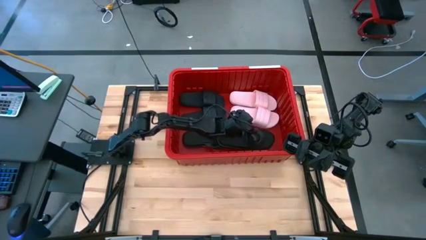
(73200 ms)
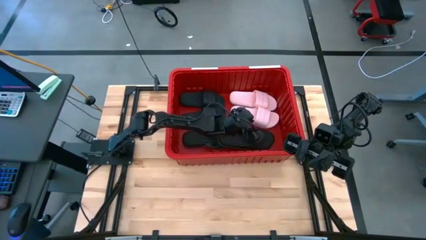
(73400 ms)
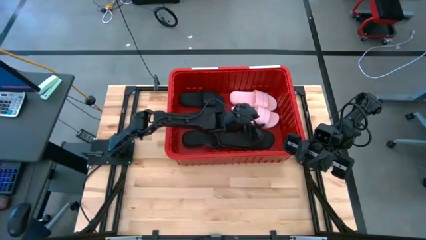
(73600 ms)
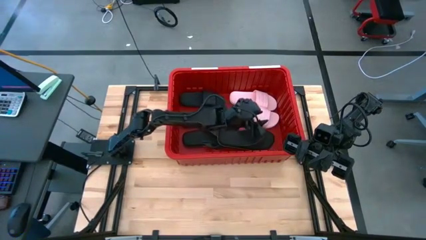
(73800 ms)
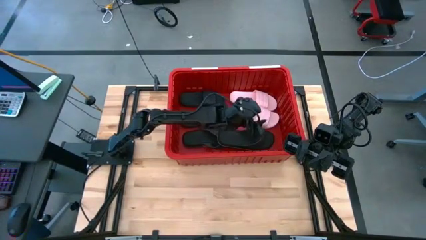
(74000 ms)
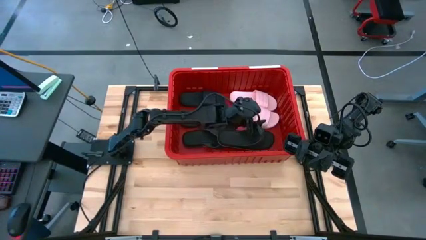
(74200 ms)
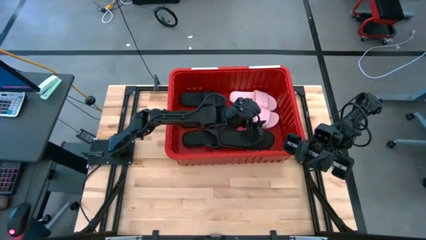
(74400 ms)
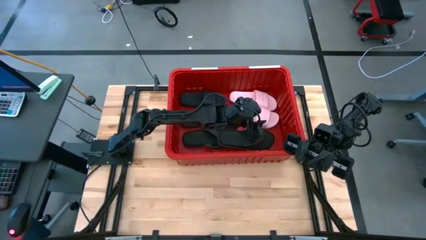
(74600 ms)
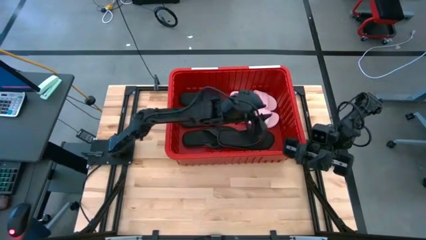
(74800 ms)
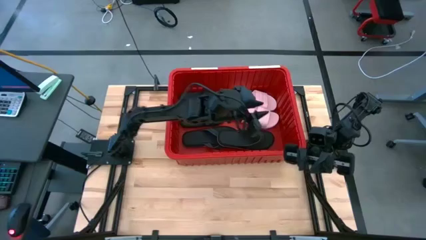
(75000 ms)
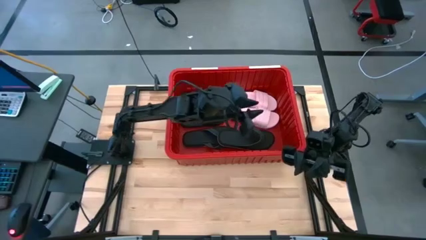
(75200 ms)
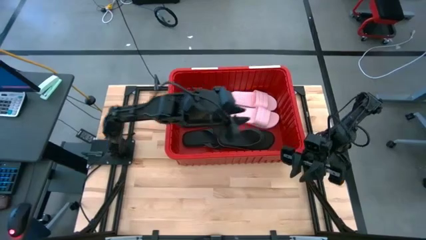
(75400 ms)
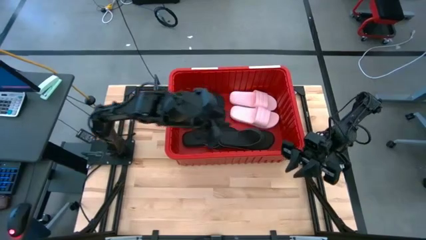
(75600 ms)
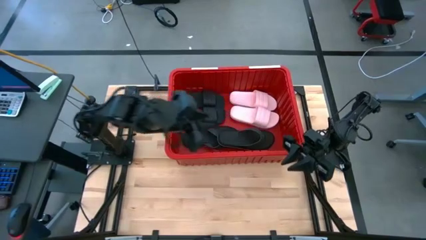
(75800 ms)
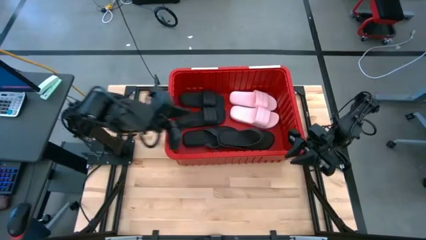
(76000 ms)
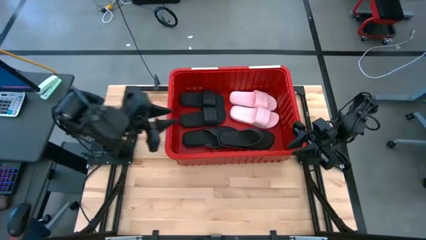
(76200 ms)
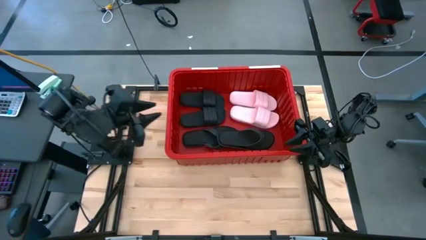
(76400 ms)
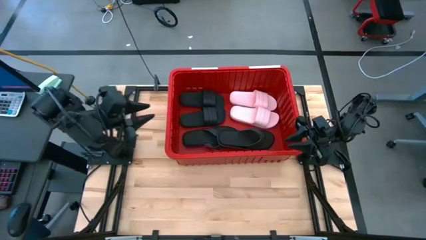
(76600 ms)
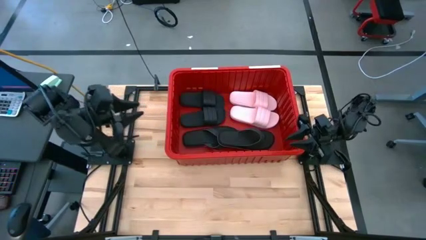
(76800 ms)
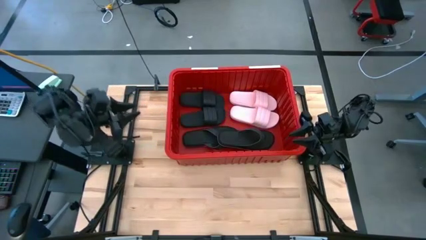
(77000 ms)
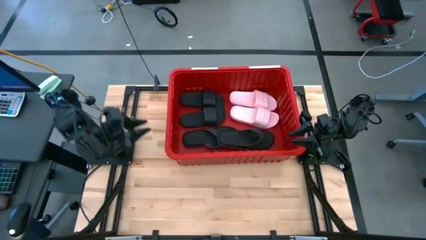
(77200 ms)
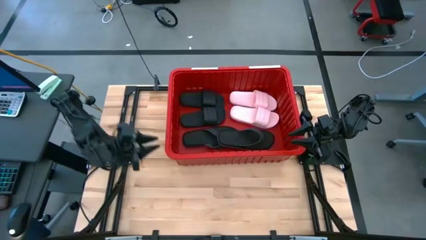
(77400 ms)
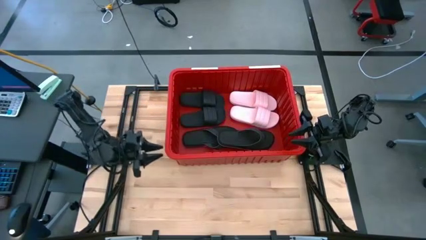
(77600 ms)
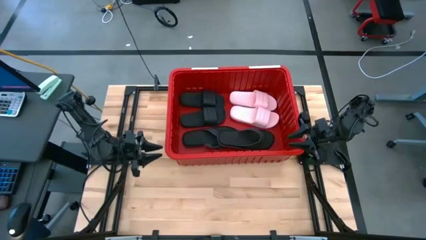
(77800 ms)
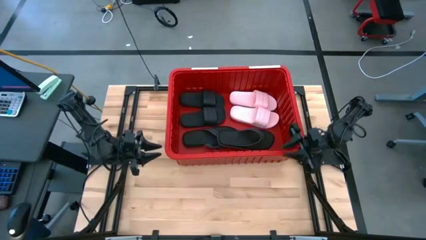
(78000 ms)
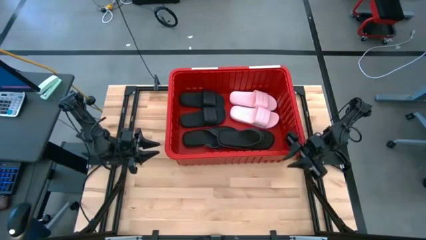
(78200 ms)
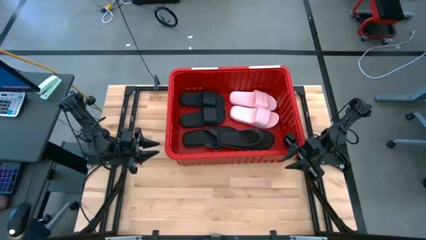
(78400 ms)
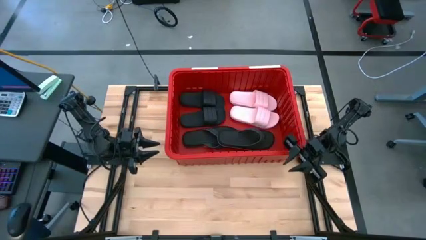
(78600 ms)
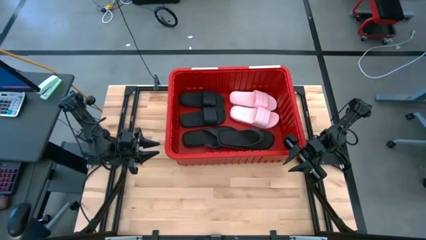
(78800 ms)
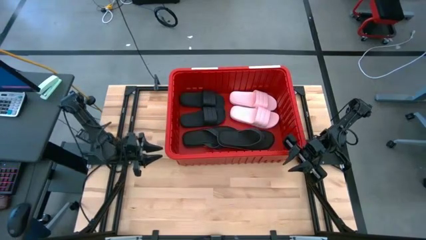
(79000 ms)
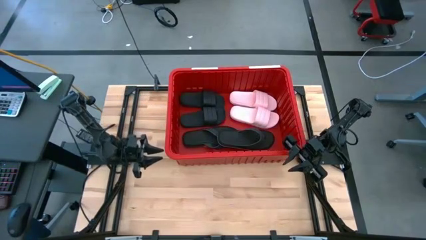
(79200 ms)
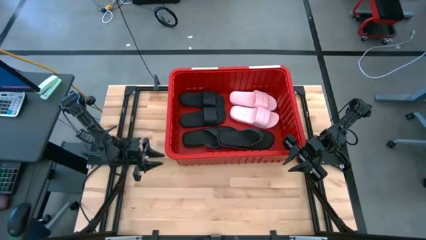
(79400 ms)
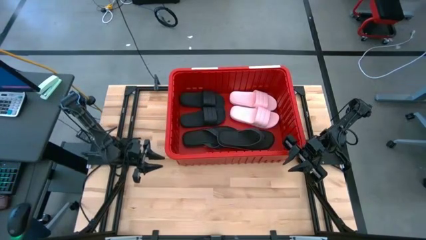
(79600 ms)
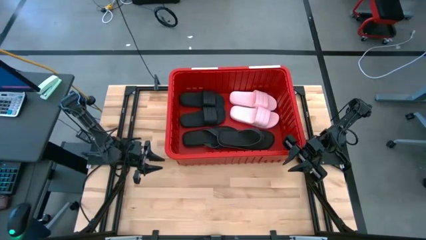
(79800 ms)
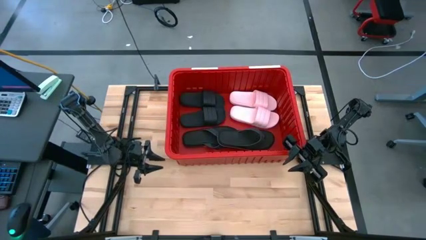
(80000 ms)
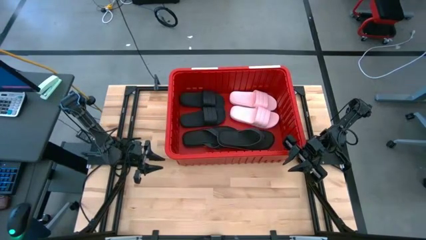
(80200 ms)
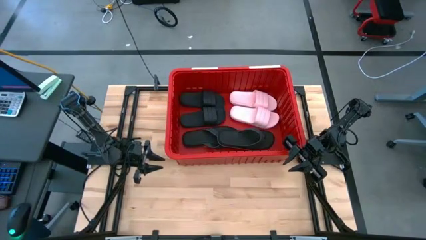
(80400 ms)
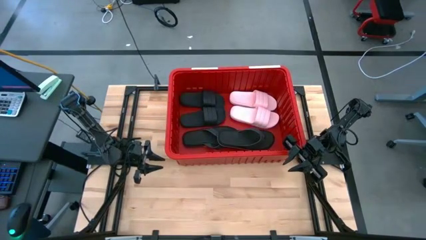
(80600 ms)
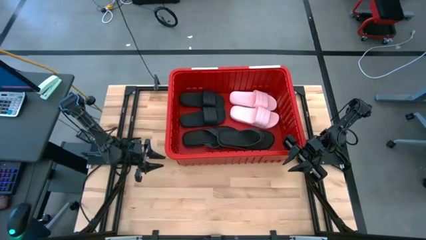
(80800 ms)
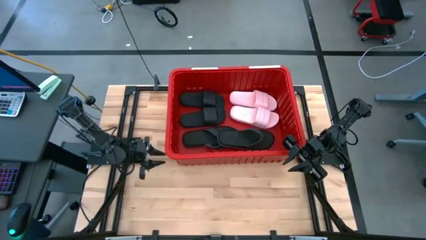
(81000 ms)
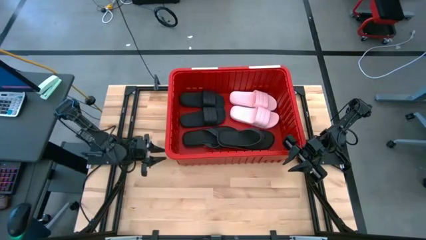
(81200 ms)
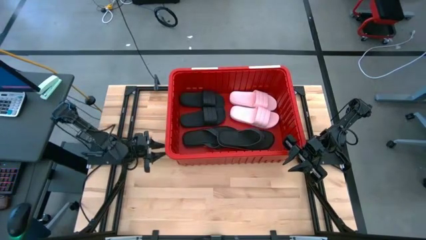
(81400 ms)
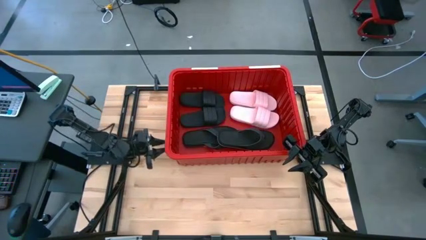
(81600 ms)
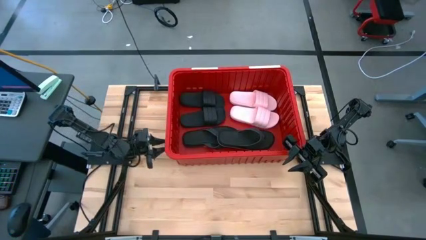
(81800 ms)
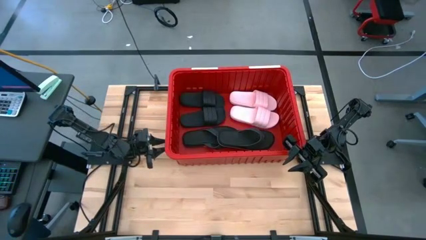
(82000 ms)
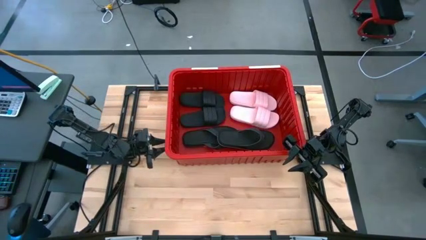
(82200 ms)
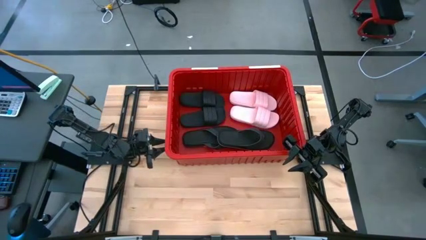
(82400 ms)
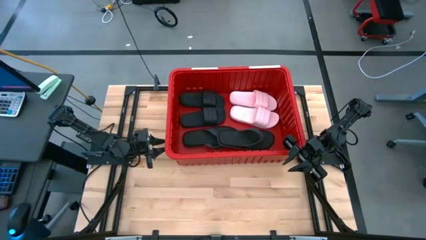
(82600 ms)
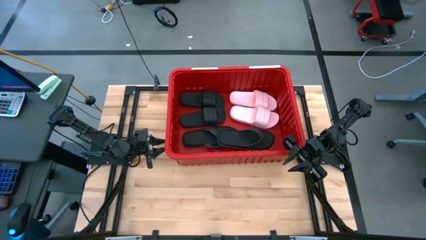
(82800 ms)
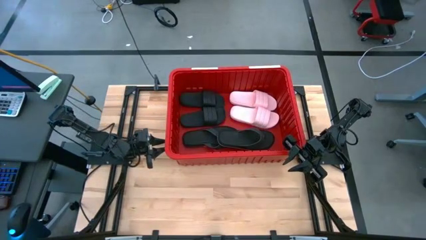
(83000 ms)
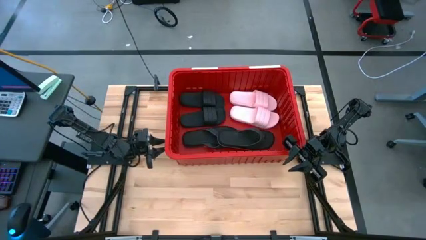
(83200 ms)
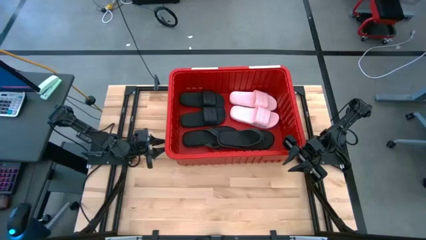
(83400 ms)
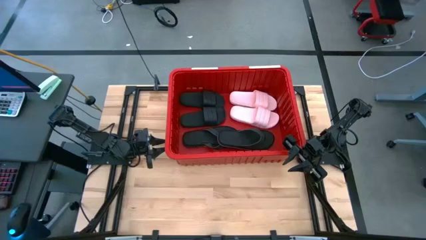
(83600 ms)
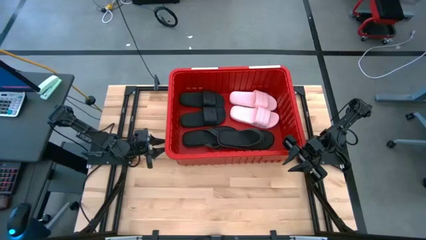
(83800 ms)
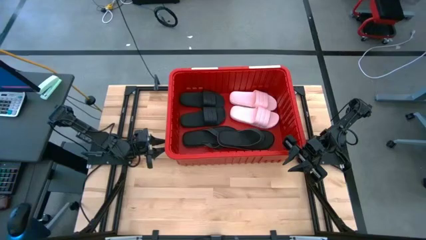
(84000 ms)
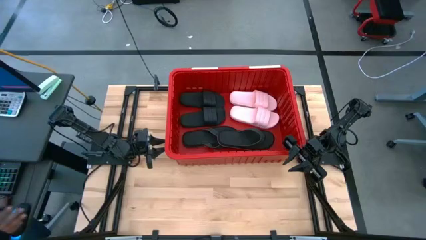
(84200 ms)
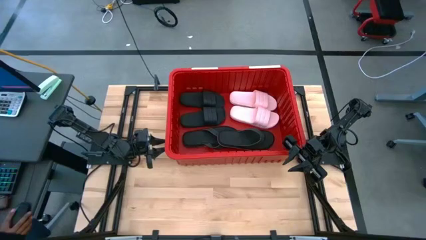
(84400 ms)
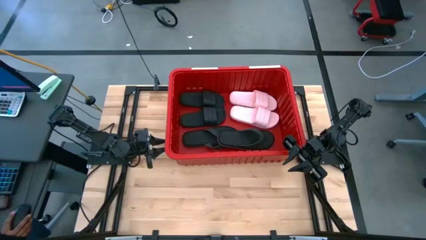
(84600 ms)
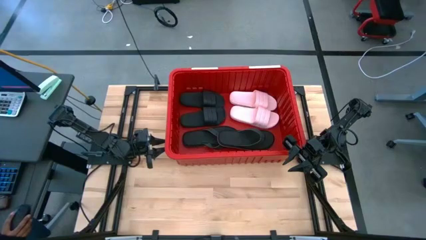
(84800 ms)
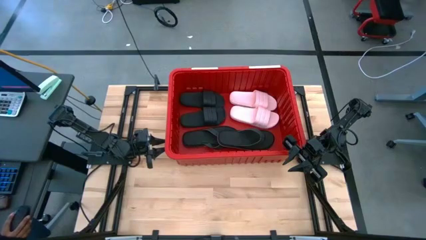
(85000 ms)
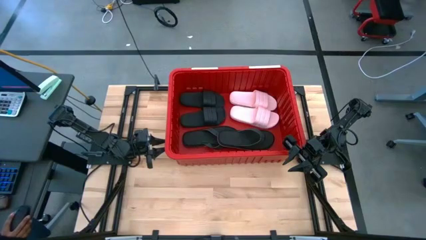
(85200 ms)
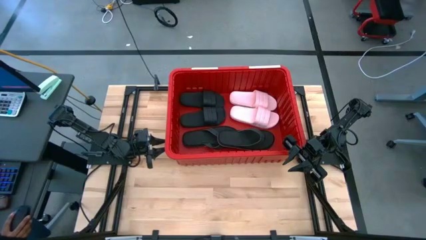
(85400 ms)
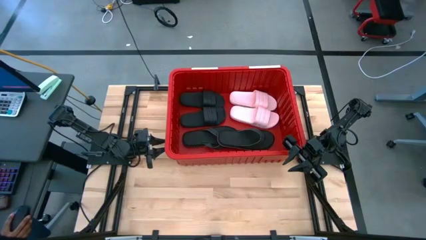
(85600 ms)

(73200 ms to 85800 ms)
Task: Pick and place slides into bin
Return to Home Position
